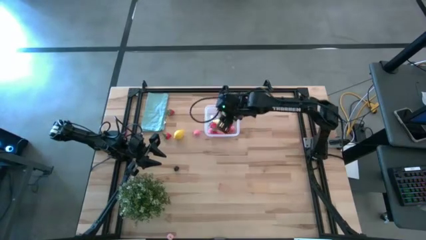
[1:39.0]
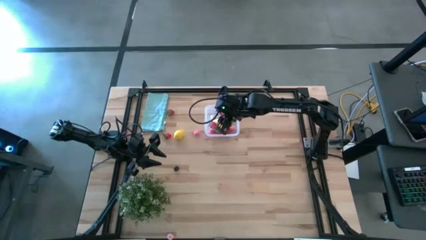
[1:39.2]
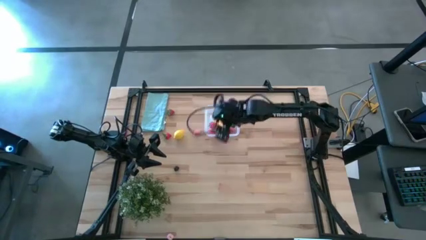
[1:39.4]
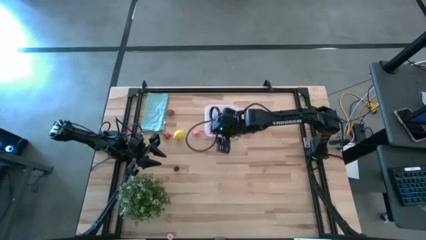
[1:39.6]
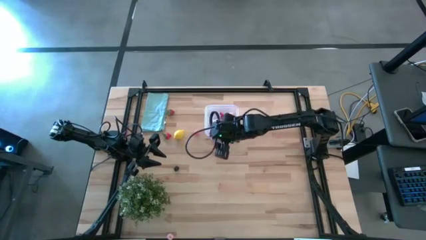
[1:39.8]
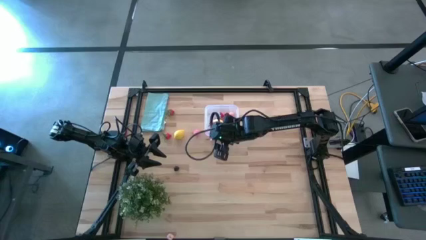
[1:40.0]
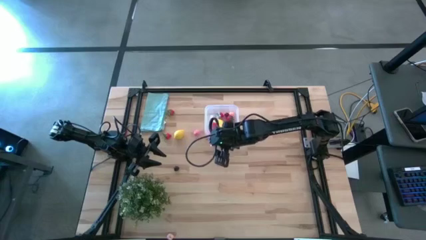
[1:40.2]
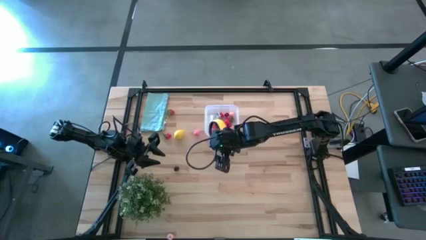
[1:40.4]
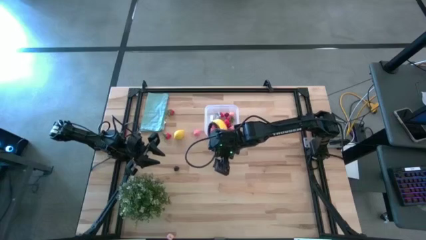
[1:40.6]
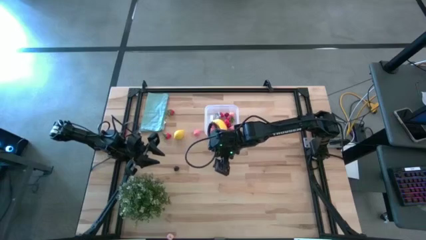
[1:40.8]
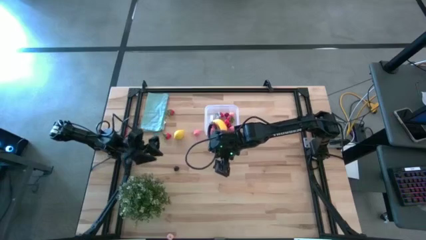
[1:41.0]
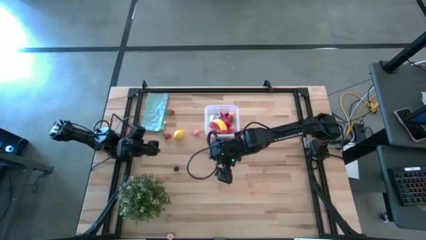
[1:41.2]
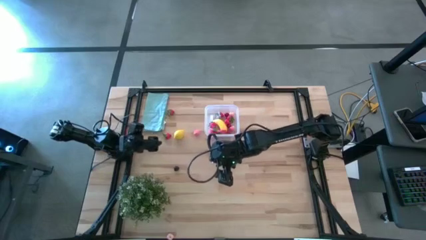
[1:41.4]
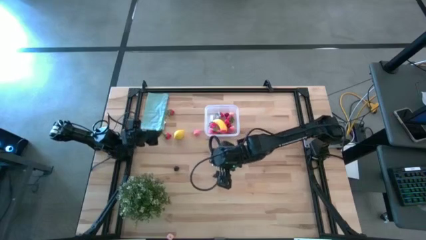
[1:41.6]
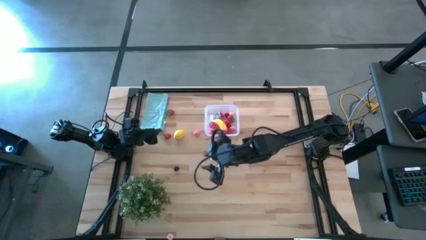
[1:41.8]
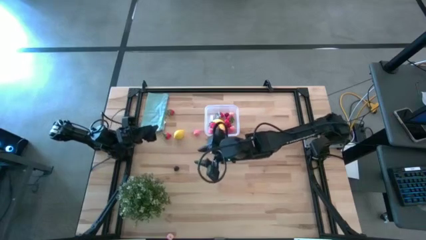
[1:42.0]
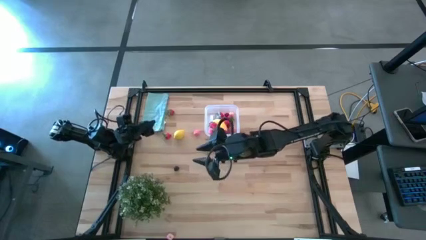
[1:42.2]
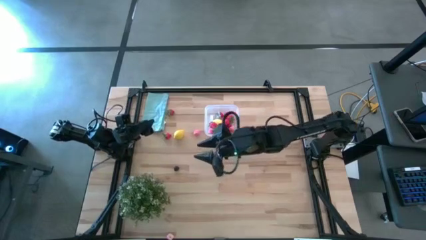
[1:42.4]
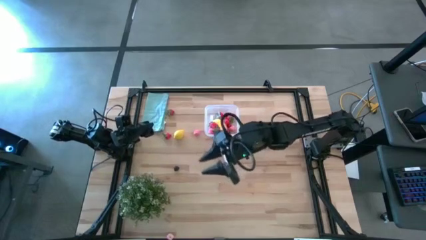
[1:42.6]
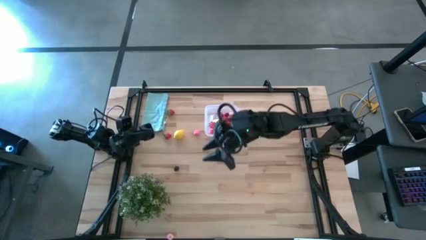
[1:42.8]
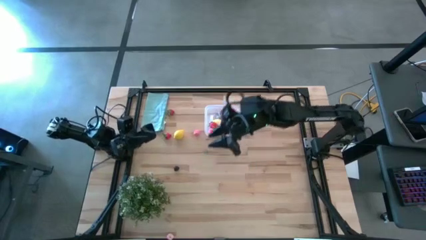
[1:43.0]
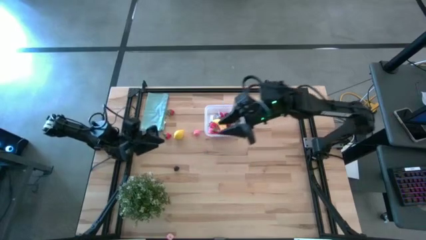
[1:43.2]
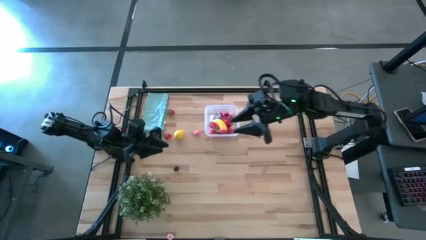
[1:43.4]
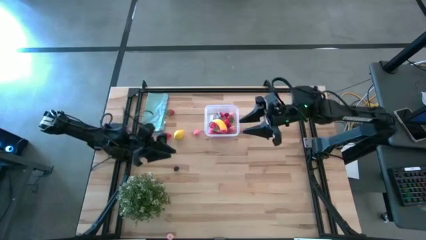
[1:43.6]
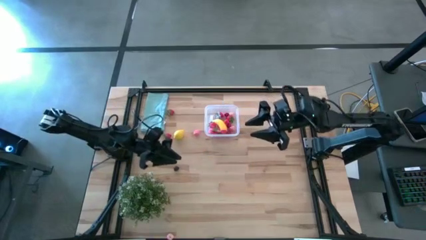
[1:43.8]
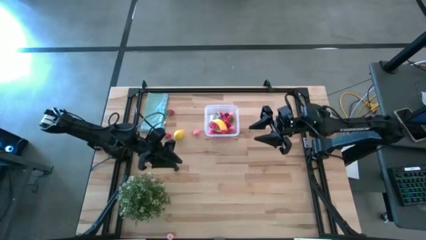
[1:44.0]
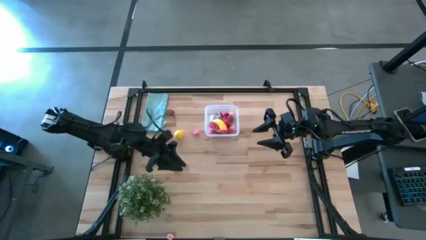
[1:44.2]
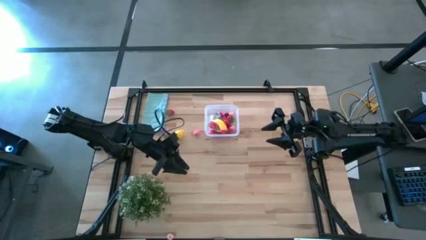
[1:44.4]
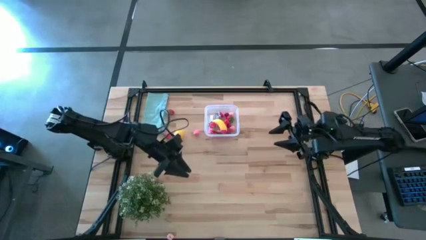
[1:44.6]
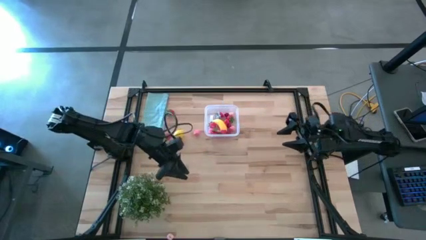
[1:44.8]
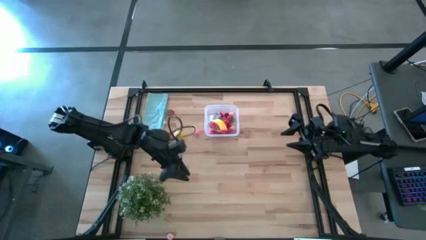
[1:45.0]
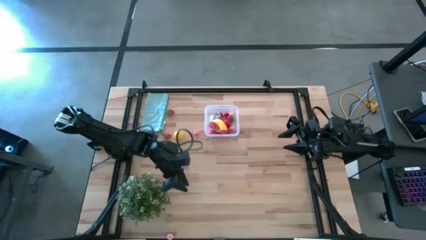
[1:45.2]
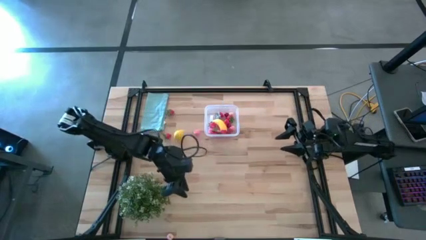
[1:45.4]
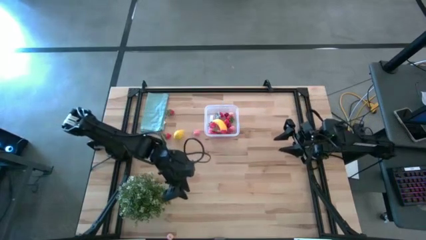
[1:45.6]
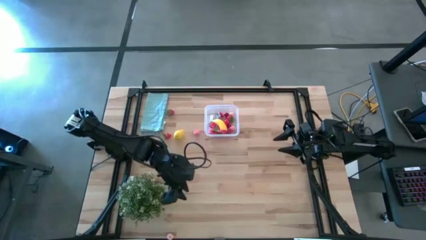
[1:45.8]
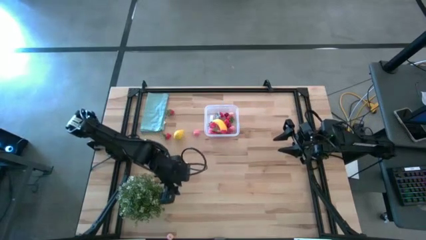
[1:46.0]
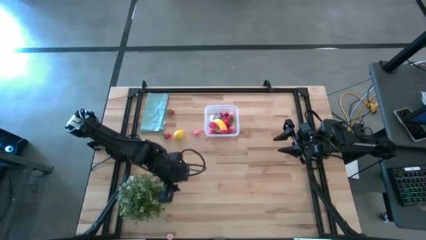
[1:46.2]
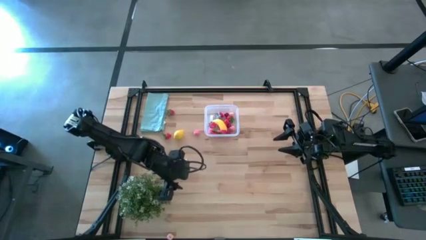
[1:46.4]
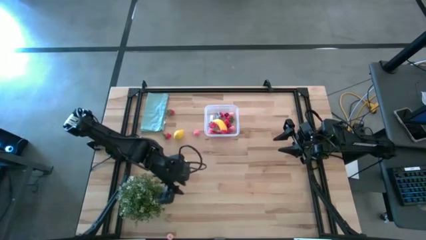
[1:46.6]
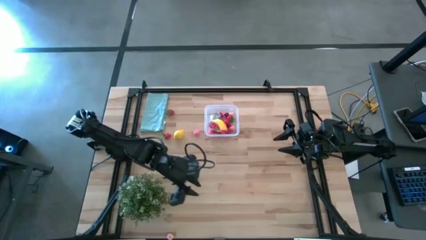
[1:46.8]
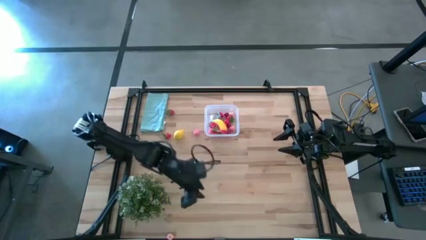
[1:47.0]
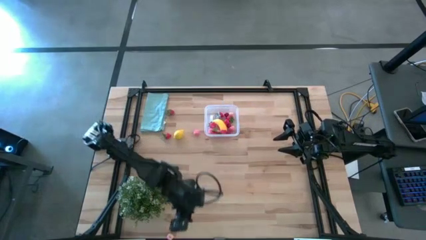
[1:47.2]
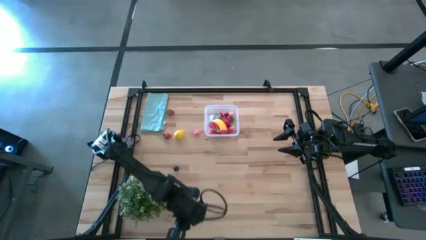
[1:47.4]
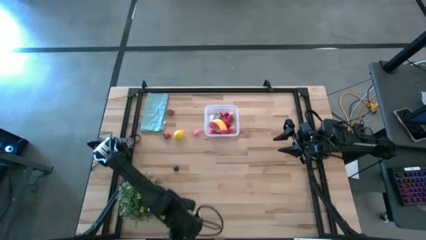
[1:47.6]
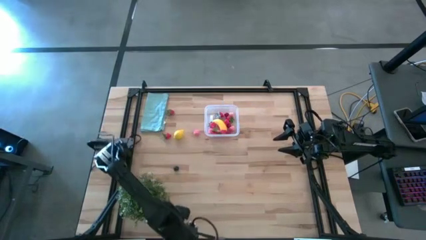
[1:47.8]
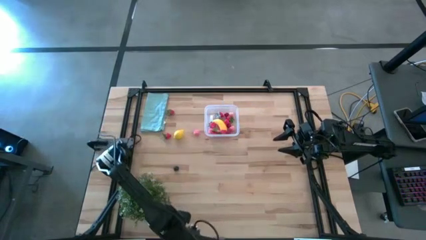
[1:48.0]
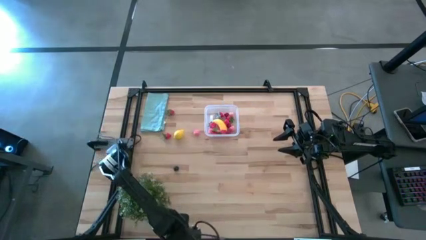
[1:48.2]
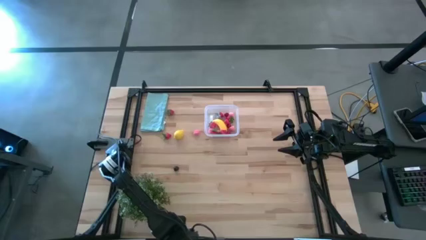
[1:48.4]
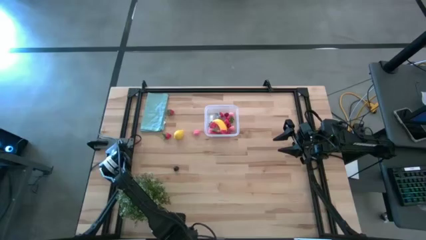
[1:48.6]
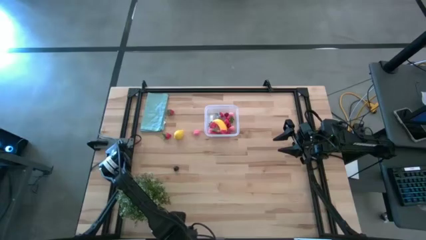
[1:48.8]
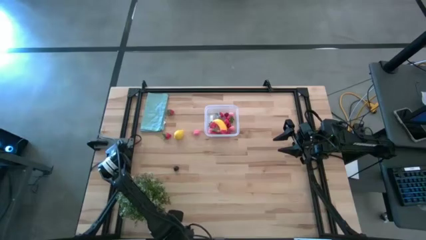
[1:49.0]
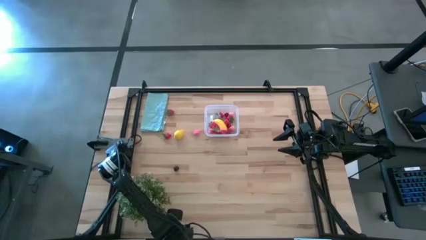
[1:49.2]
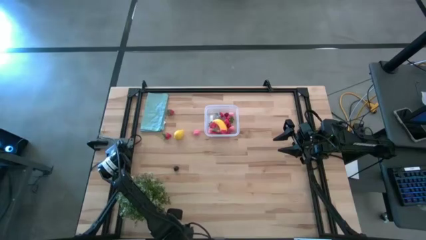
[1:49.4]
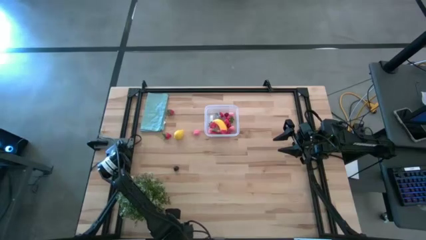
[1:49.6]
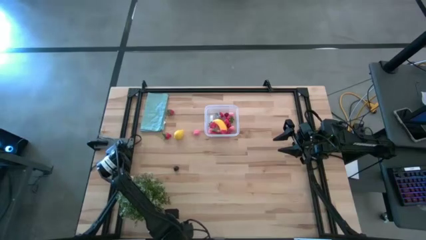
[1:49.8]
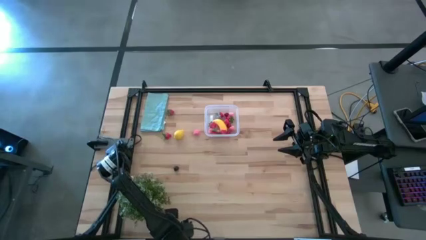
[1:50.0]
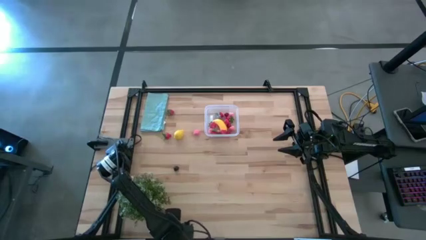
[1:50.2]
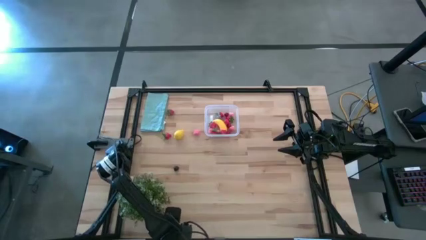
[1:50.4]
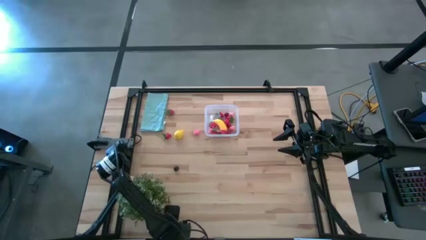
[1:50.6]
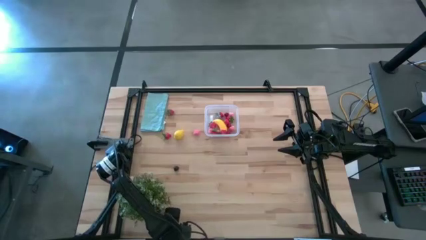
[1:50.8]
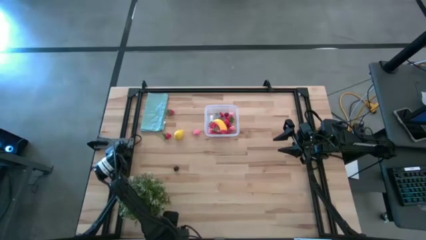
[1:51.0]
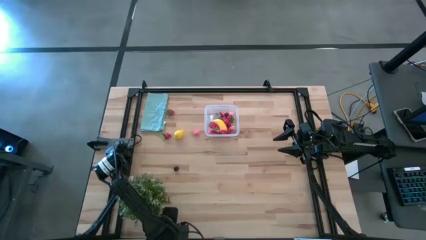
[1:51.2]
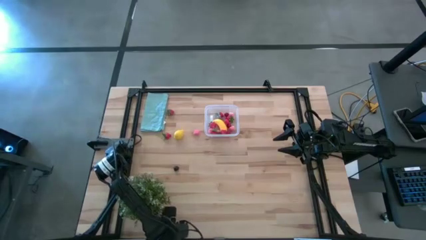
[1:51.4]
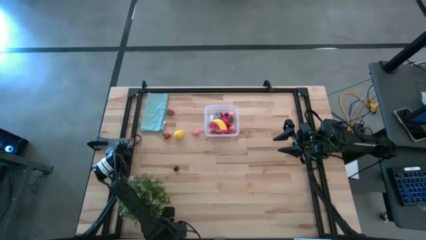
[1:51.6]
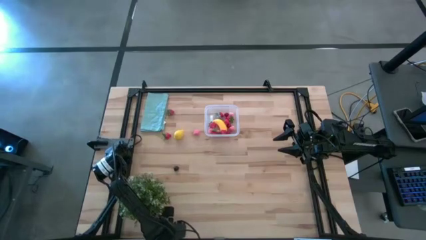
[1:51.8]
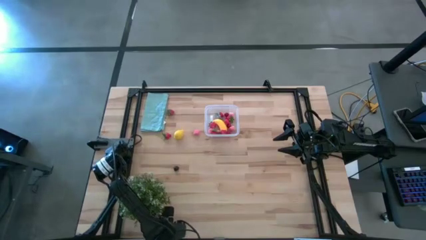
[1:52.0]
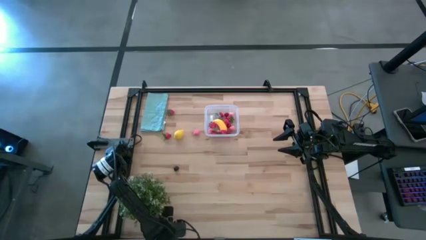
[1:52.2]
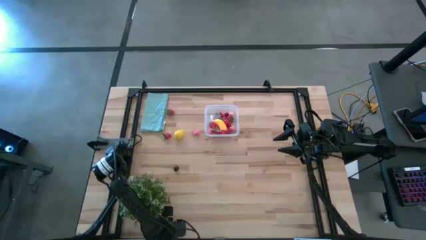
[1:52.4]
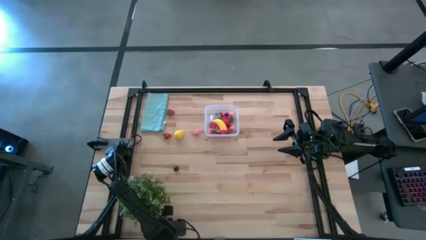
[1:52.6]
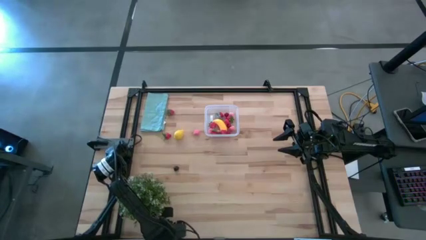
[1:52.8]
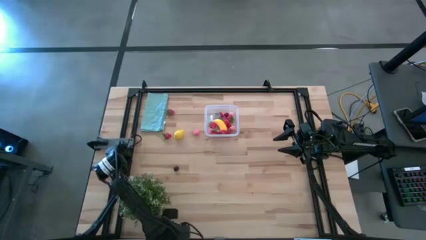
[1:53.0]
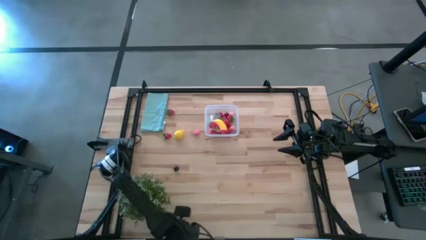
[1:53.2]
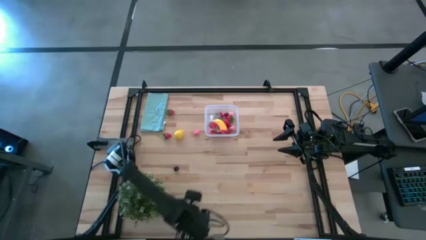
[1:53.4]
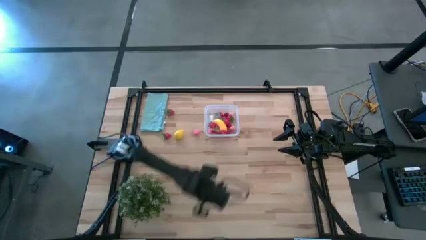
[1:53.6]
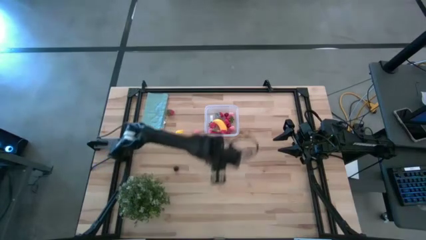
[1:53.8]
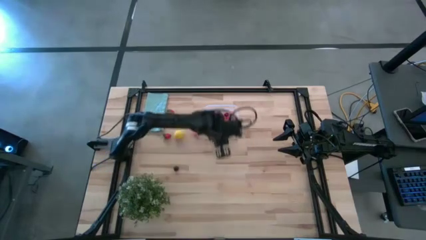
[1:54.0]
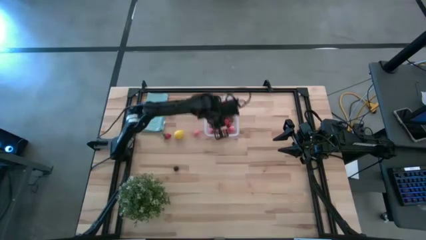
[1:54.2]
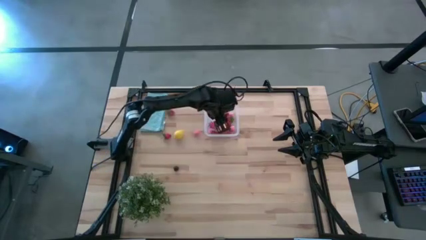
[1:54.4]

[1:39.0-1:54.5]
Task: Pick and placing Produce into tupperware
Put the pink peach into the transparent bin

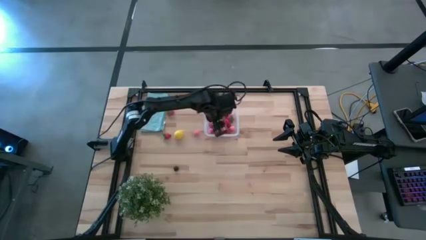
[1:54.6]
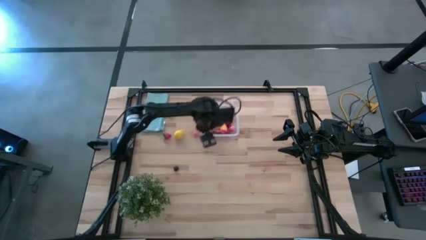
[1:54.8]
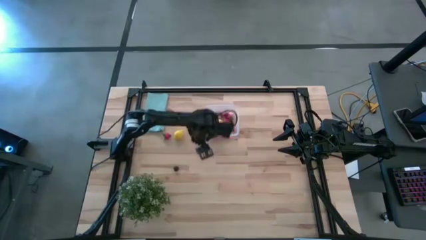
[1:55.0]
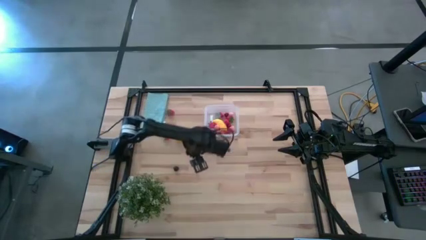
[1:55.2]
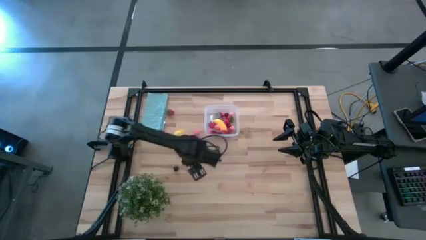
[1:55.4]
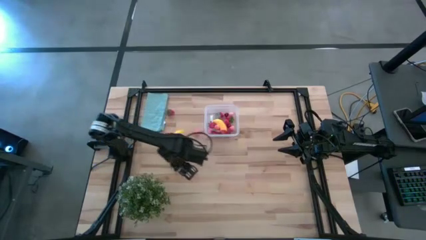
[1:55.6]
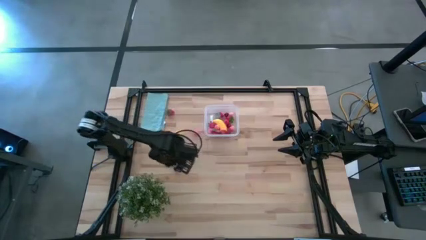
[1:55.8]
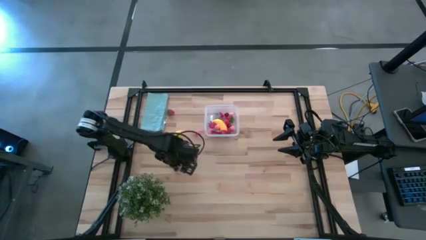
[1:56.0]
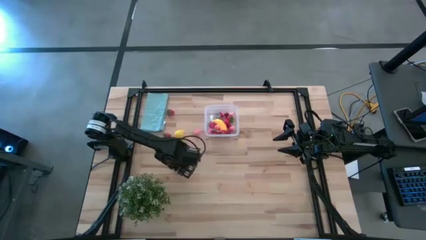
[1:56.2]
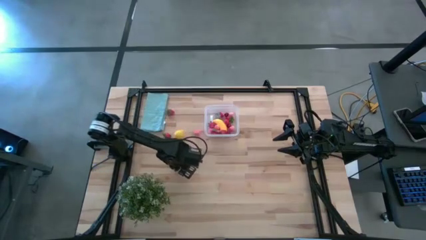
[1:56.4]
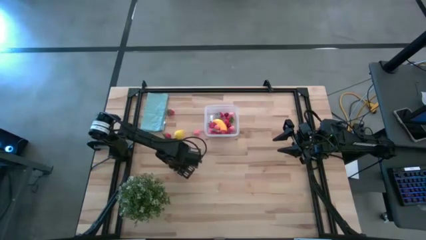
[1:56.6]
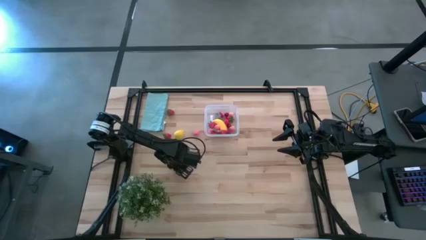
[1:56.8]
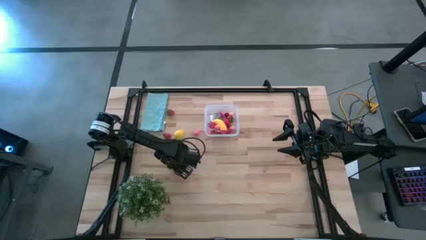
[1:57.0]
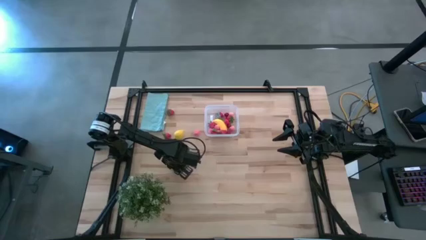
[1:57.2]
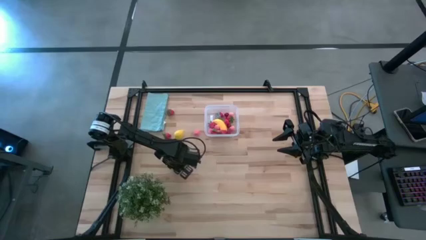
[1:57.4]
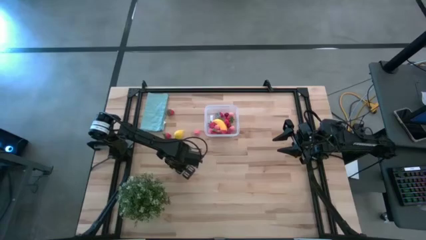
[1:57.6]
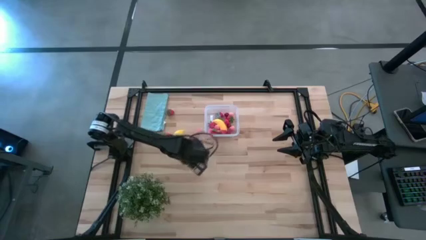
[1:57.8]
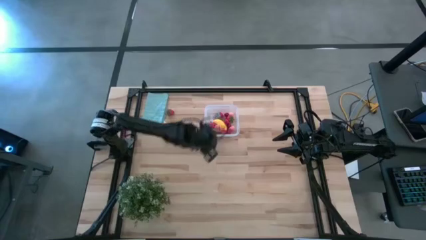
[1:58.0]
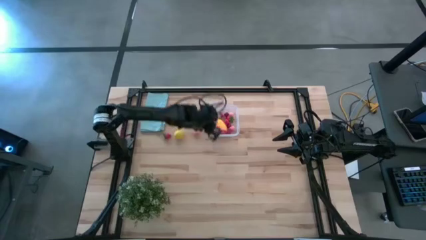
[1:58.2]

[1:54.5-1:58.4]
Put the black cherry into the transparent bin
